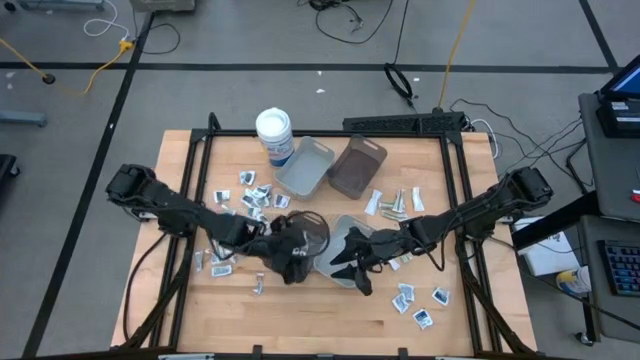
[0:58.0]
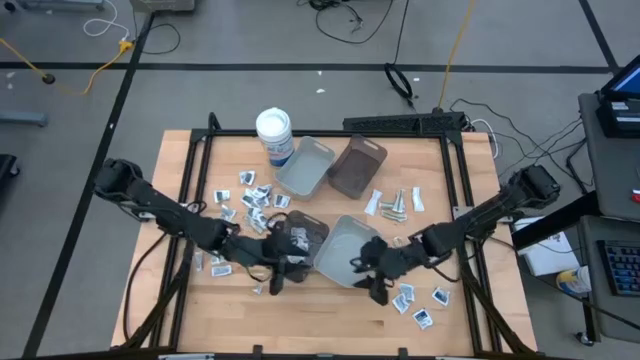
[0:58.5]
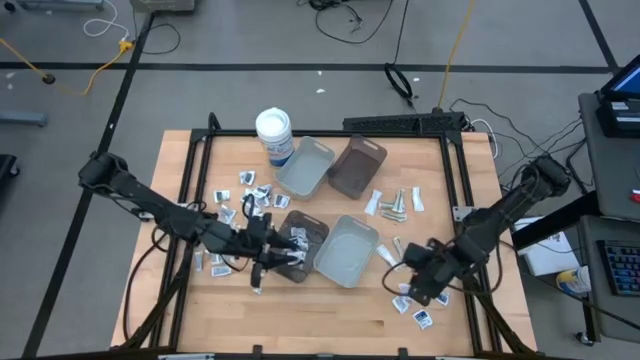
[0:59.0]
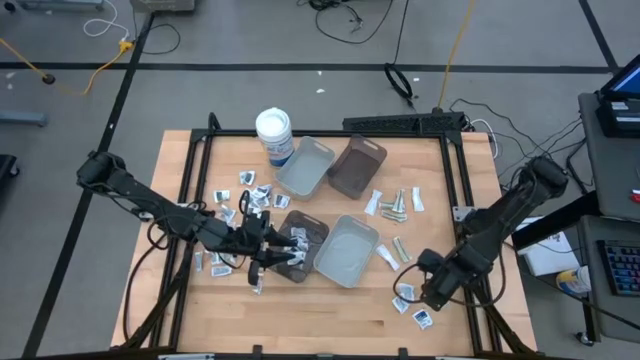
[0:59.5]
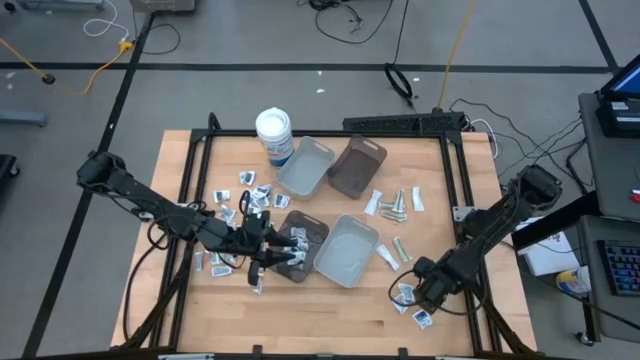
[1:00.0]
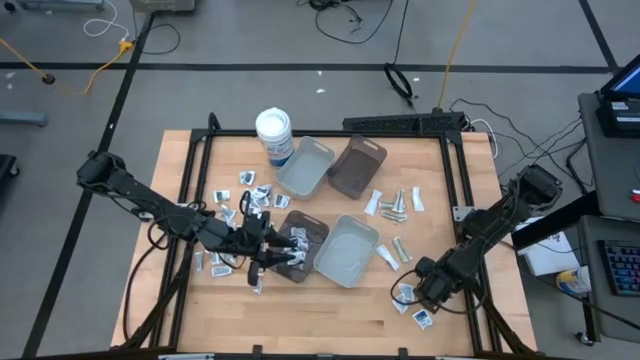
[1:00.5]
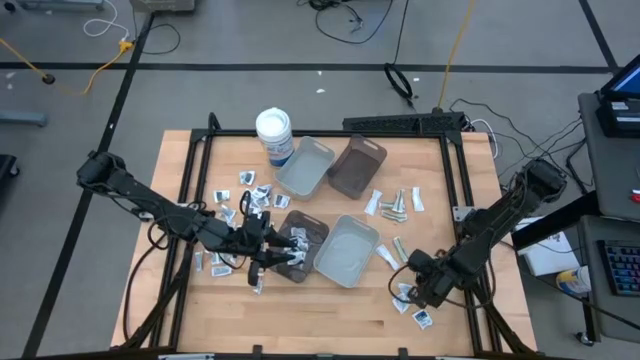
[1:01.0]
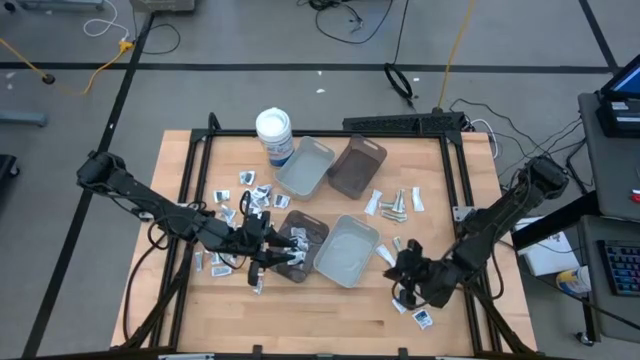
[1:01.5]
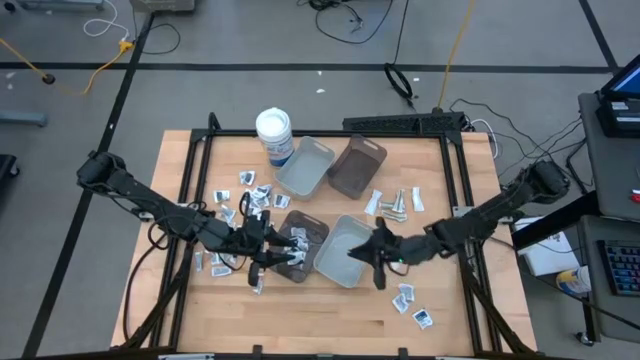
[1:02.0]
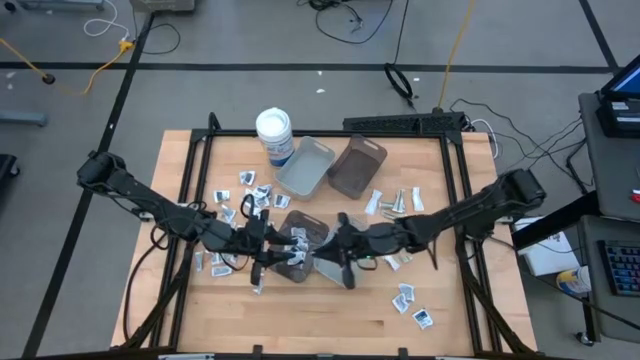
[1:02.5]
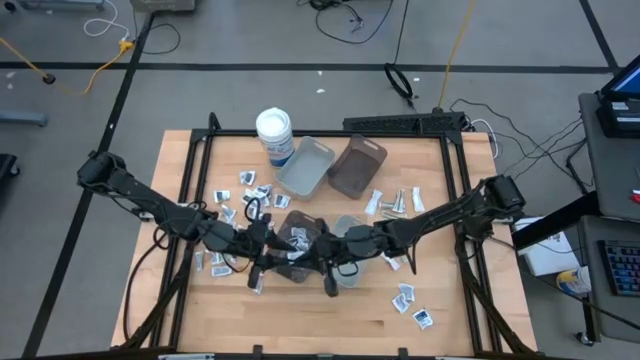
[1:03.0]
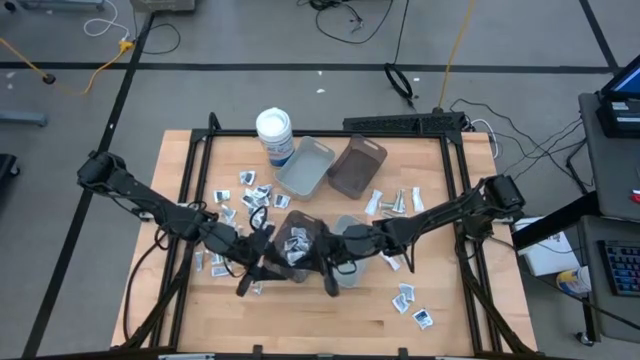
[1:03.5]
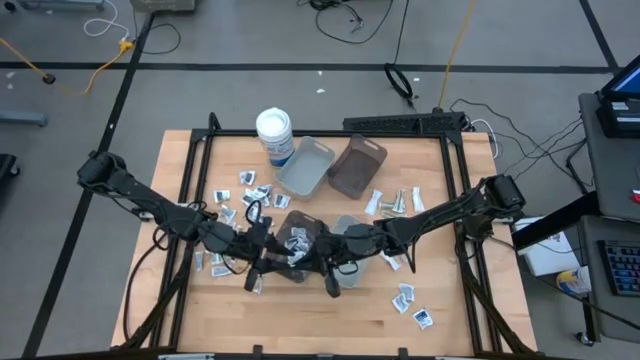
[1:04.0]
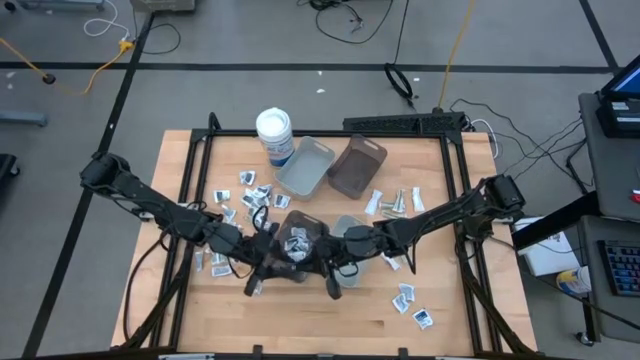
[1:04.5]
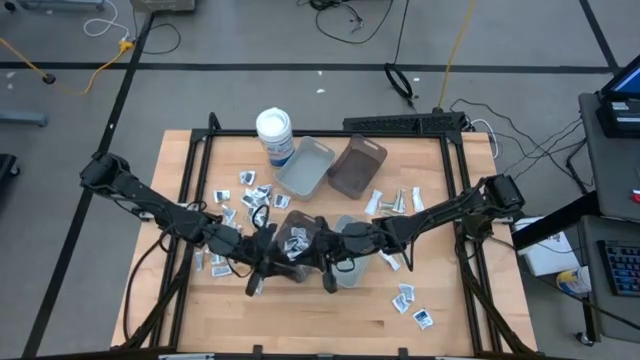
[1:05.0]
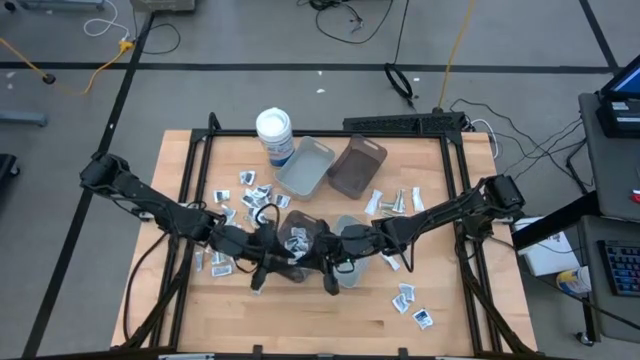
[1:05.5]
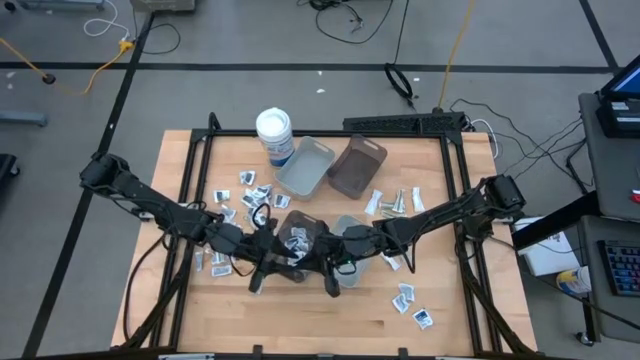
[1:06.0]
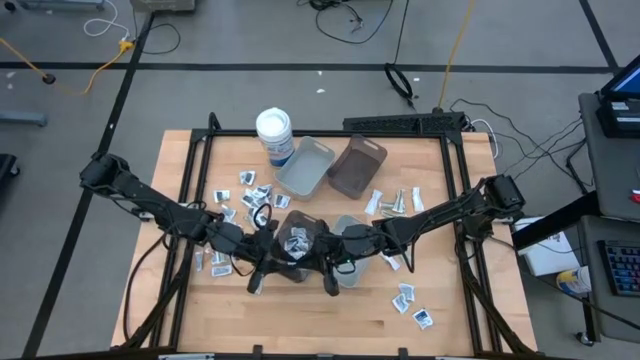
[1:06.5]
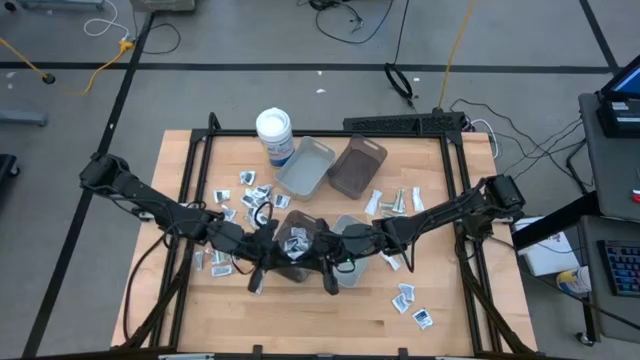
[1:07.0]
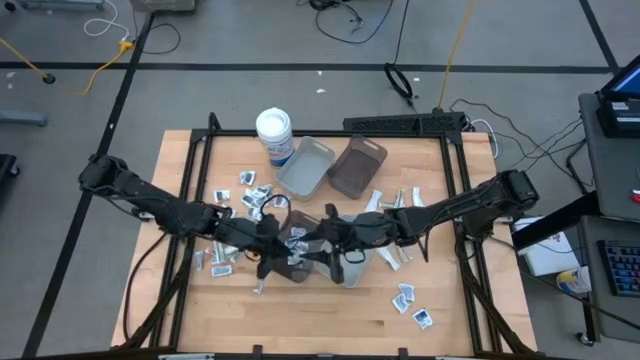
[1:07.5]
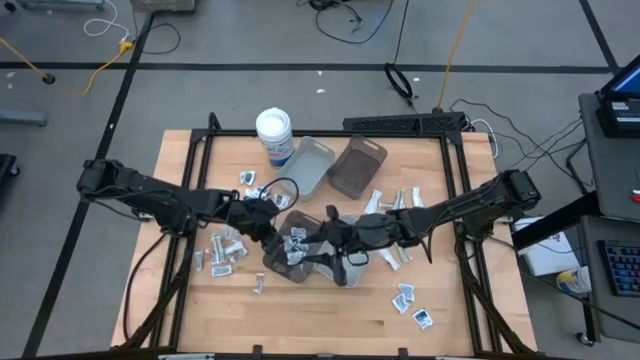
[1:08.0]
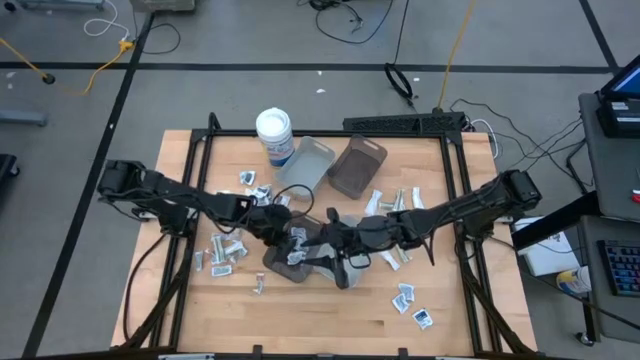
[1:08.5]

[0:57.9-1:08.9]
Task: Pick & Place First Aid Supplies
Put the blue alcohol pad into the bottom black bin

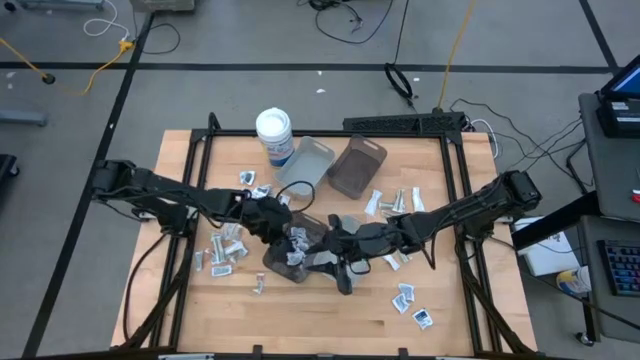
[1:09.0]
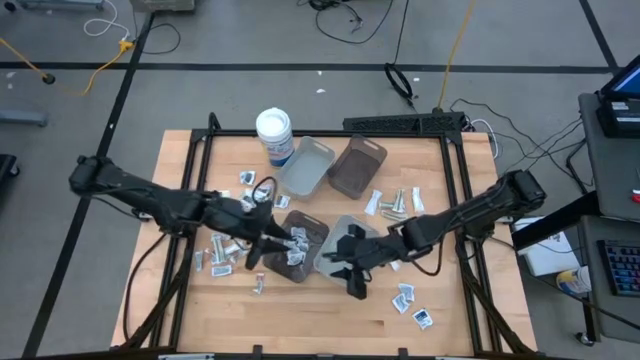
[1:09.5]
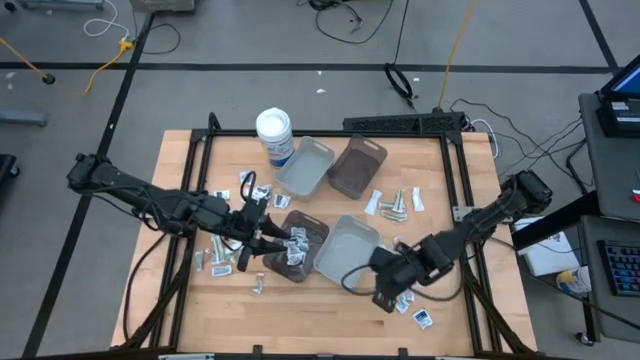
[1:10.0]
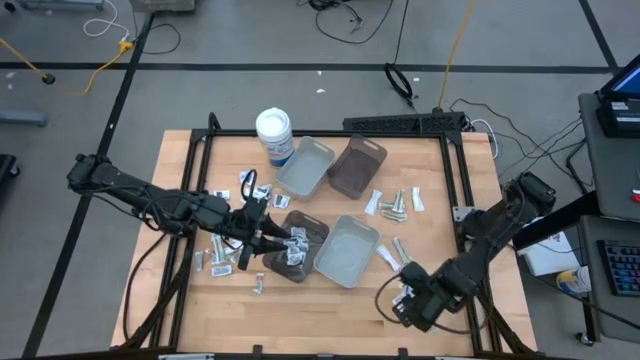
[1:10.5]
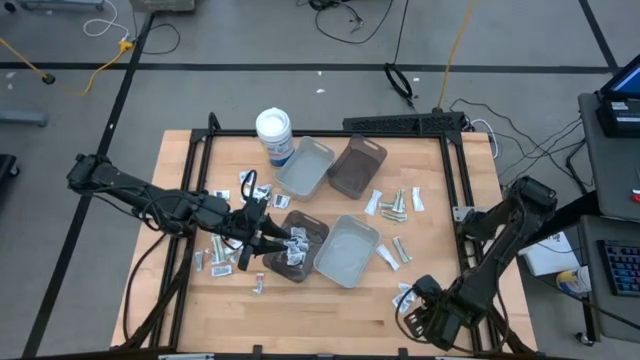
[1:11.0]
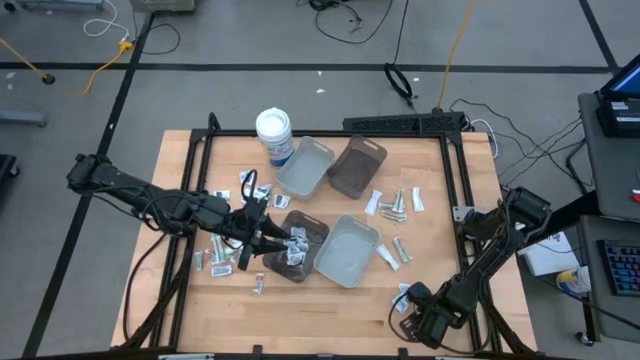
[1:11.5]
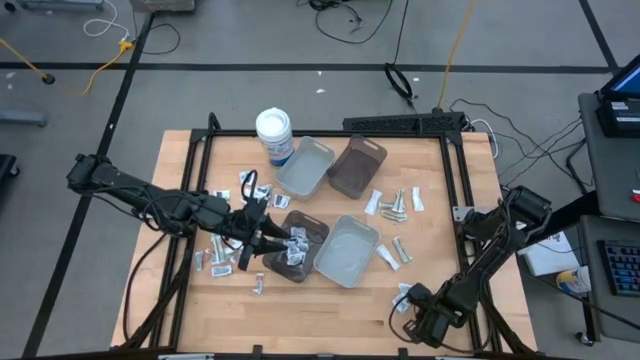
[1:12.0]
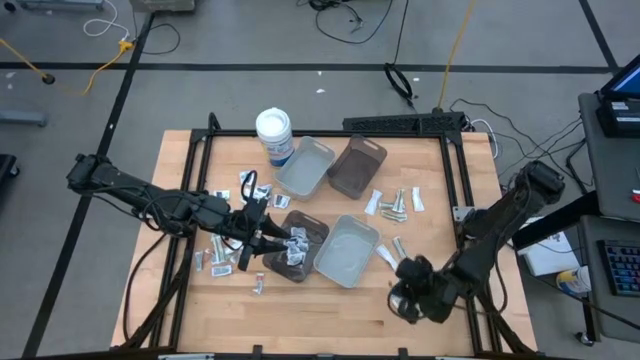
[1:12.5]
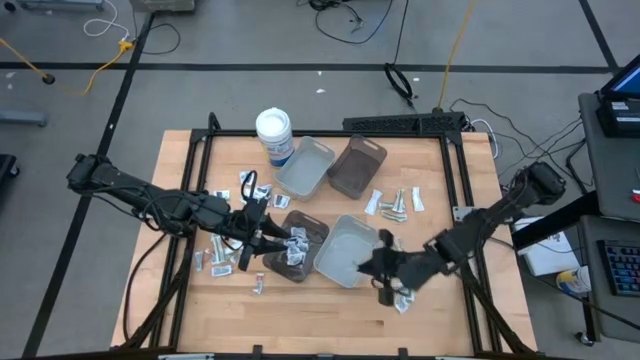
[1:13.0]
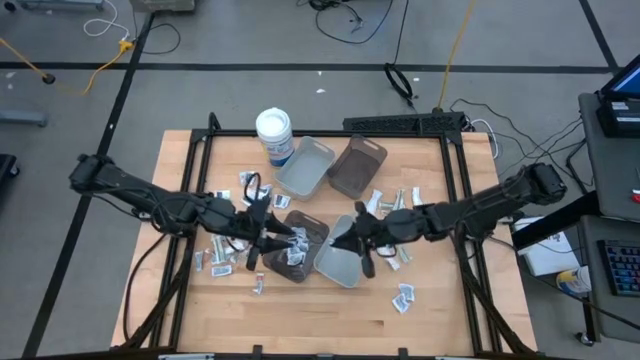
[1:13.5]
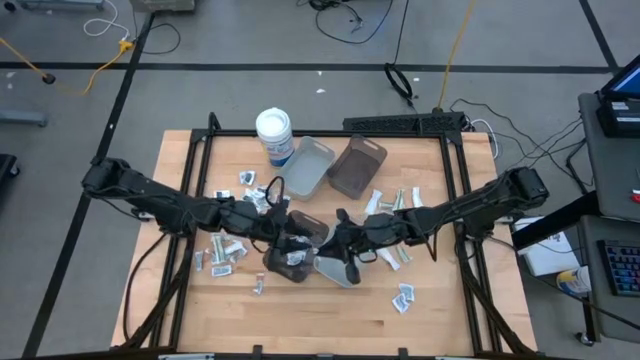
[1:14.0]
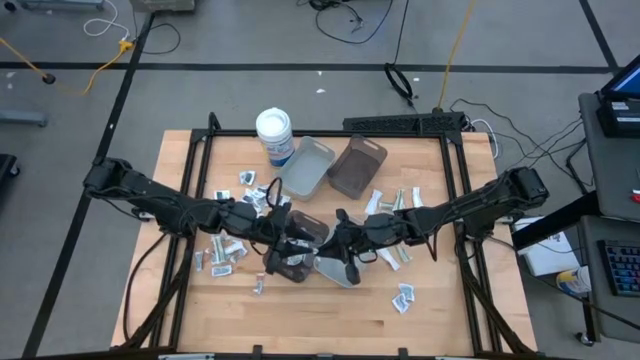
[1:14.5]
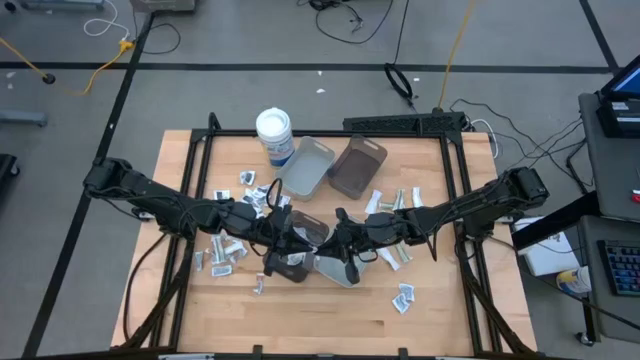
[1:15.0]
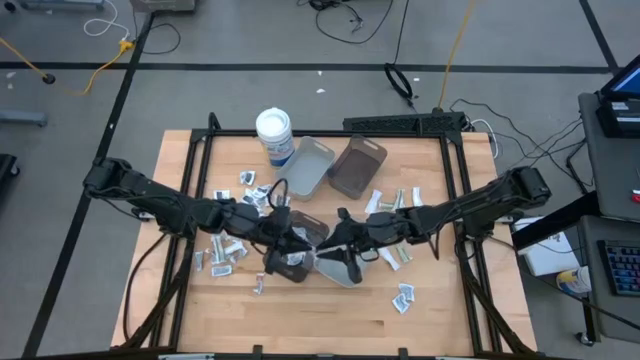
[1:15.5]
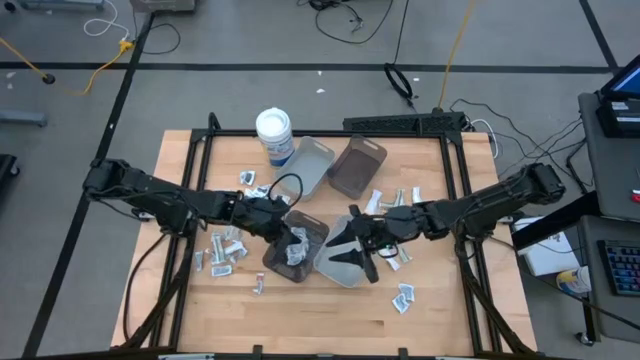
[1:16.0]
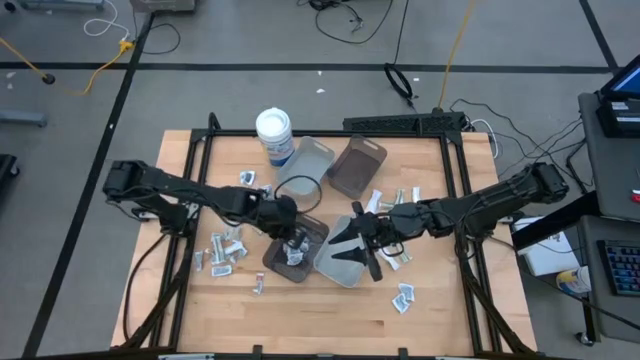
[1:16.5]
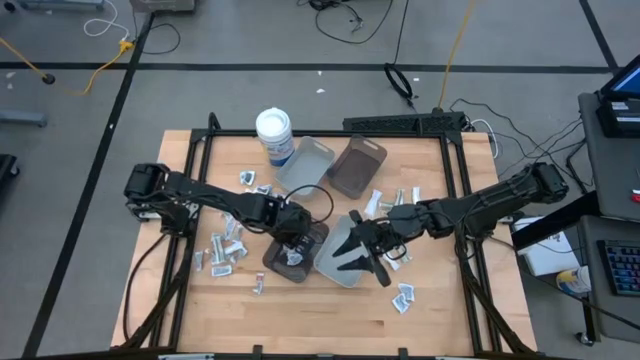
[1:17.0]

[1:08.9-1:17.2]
Put the blue alcohol pad into the bottom black bin

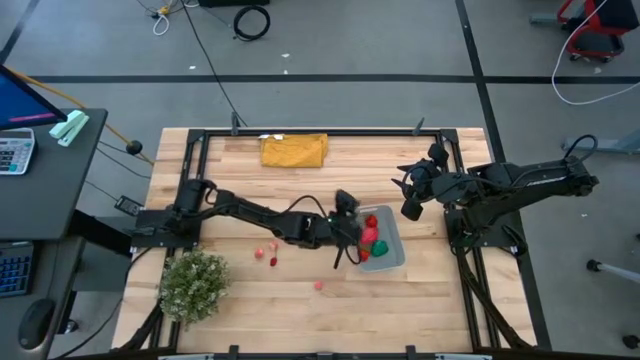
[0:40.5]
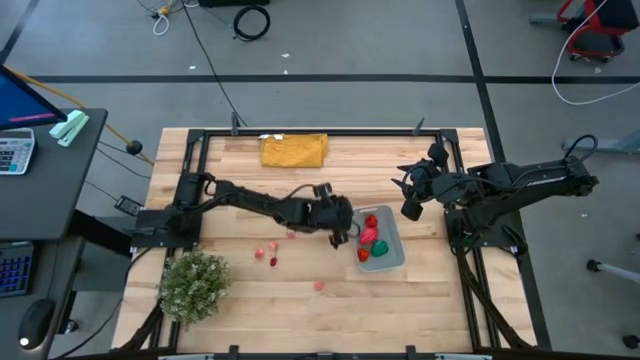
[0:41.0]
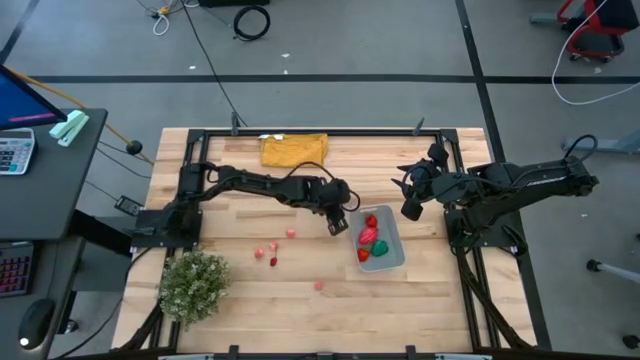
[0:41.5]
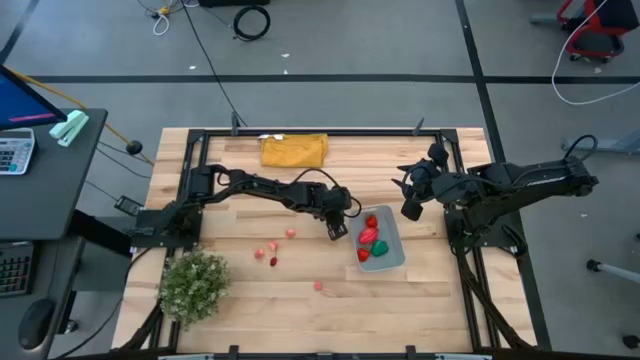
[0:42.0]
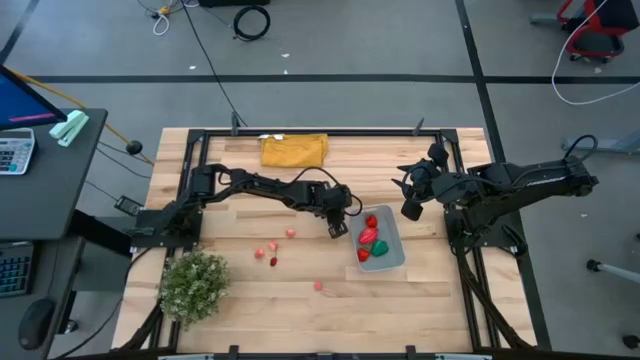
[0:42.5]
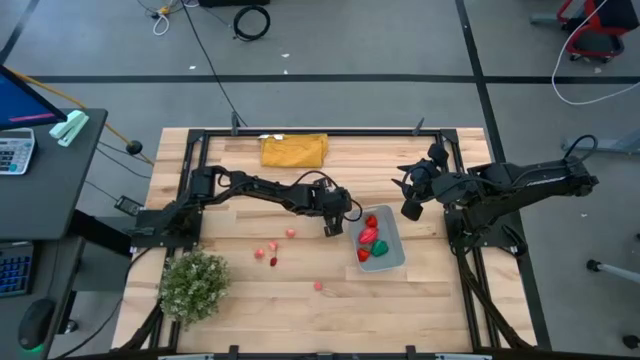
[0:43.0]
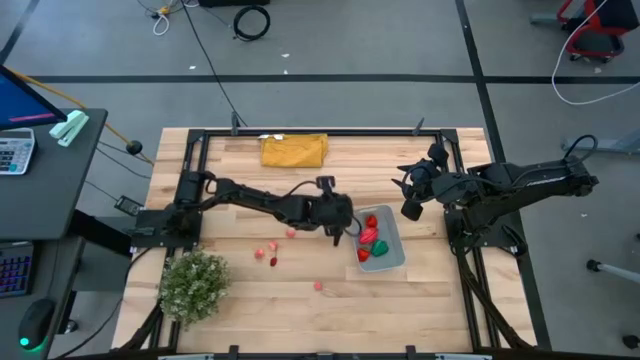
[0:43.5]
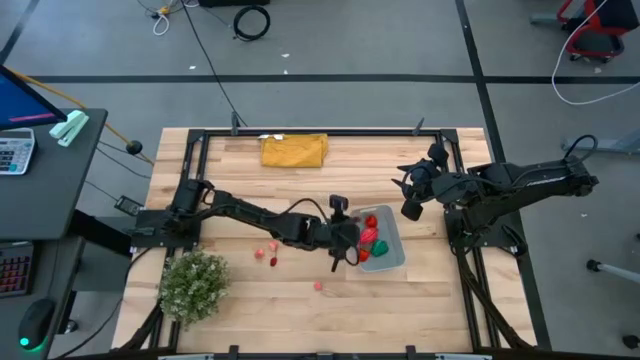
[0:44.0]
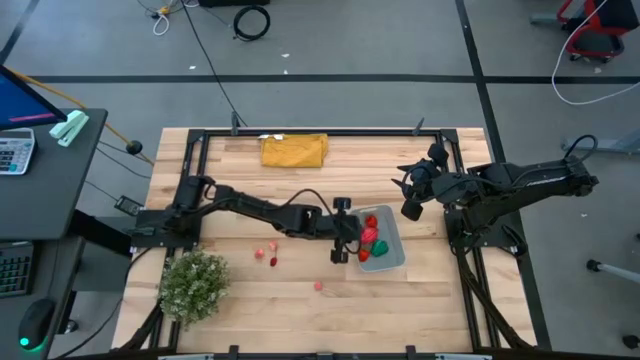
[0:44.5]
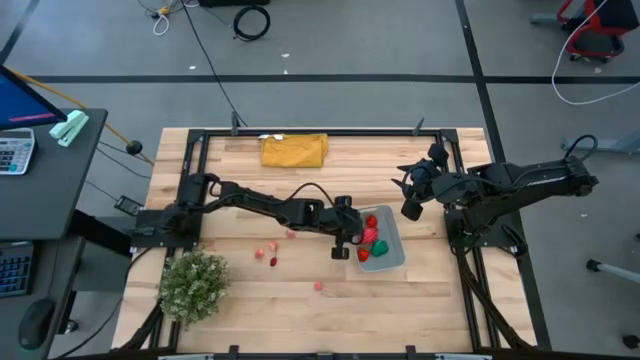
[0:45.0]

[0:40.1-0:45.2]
Task: Pick and placing Produce into tupperware
Put the red cherry into the gray bin
